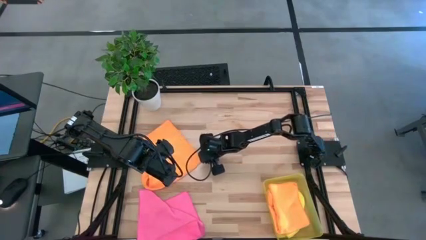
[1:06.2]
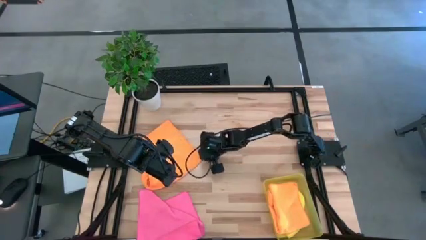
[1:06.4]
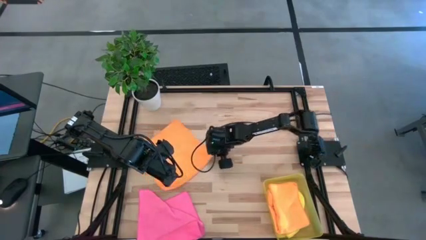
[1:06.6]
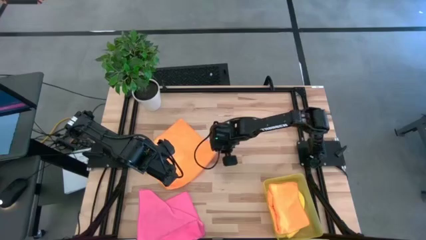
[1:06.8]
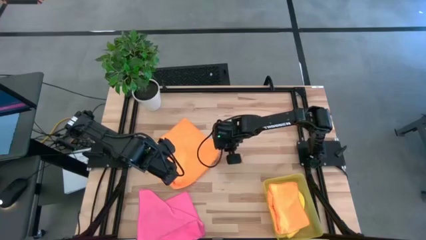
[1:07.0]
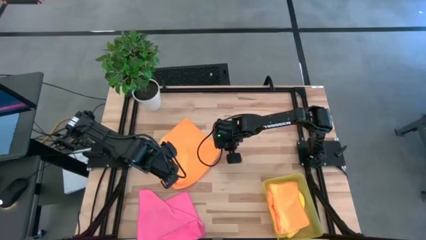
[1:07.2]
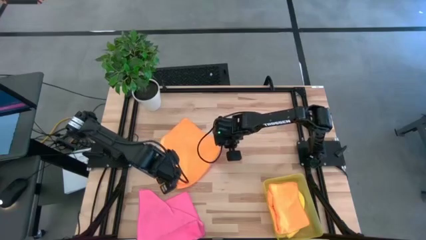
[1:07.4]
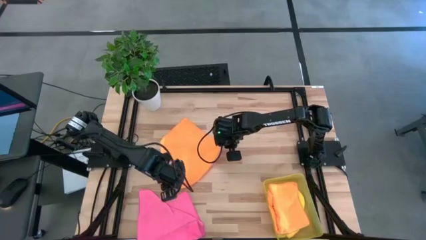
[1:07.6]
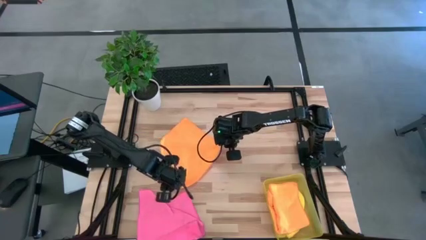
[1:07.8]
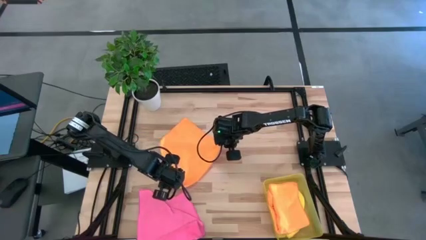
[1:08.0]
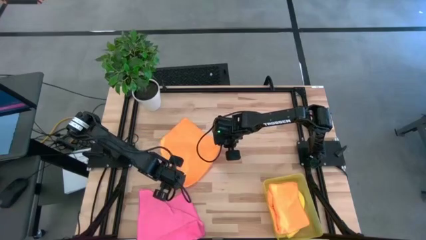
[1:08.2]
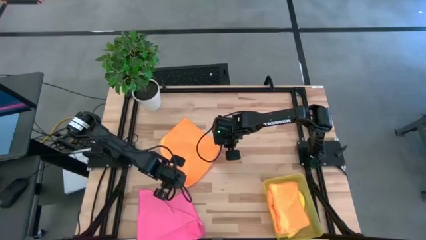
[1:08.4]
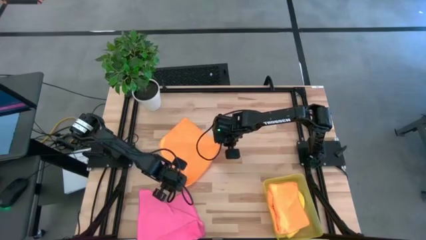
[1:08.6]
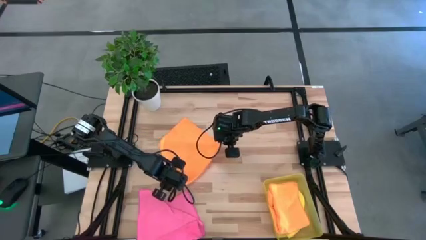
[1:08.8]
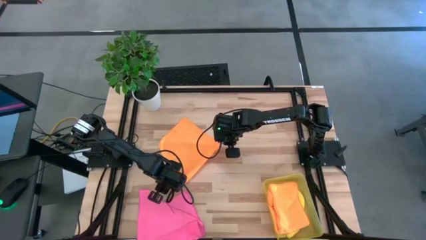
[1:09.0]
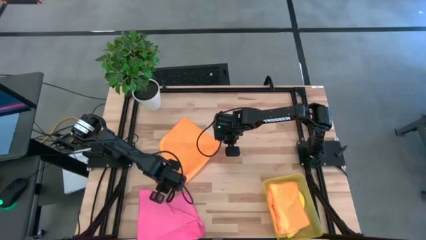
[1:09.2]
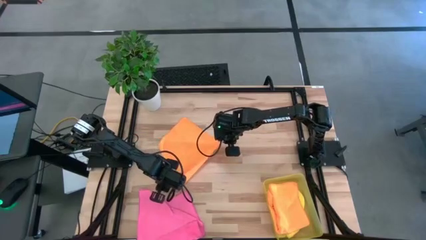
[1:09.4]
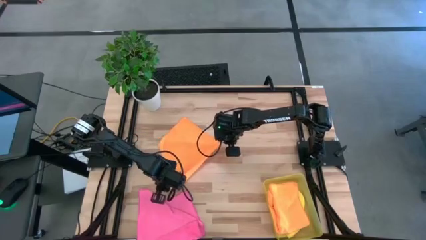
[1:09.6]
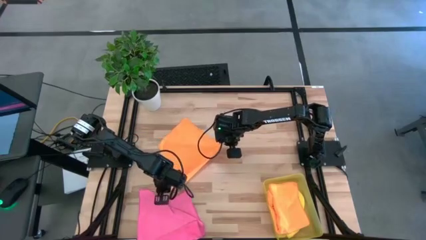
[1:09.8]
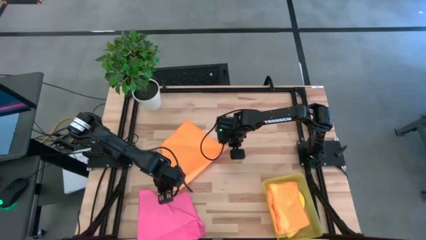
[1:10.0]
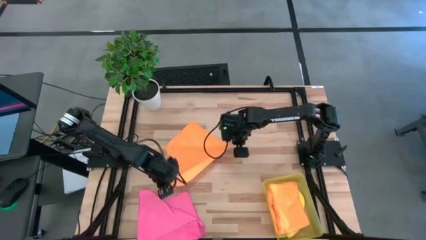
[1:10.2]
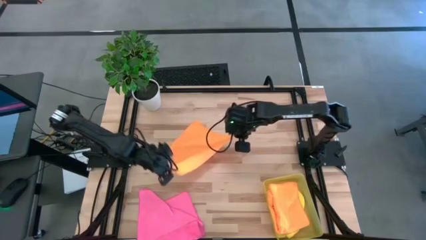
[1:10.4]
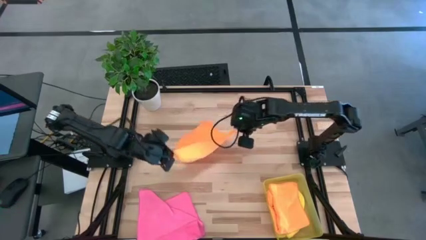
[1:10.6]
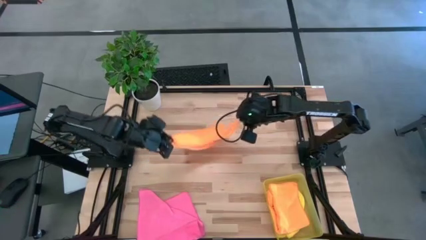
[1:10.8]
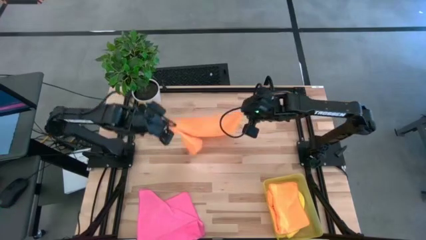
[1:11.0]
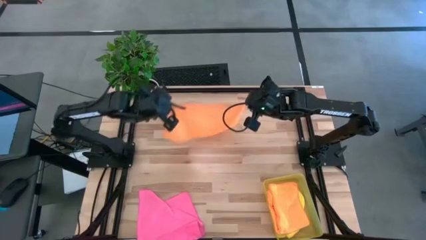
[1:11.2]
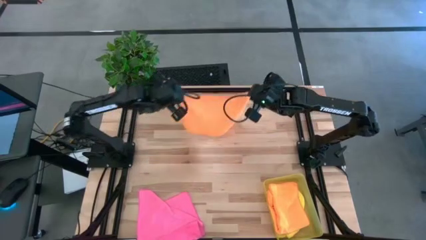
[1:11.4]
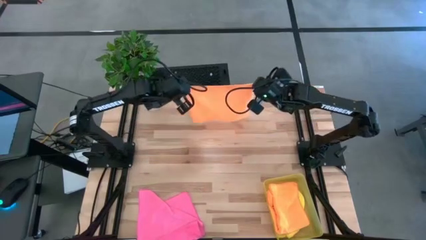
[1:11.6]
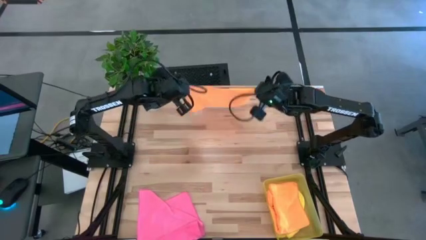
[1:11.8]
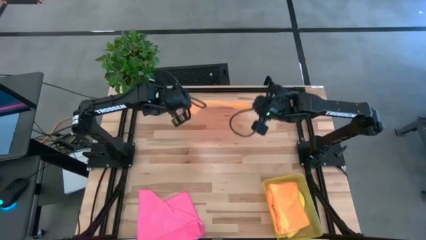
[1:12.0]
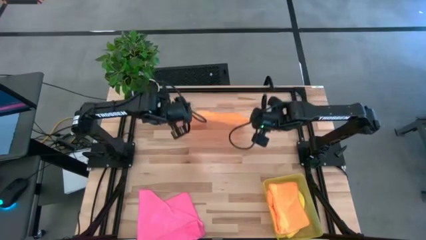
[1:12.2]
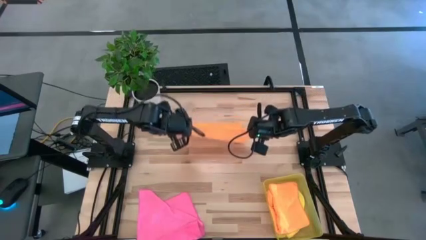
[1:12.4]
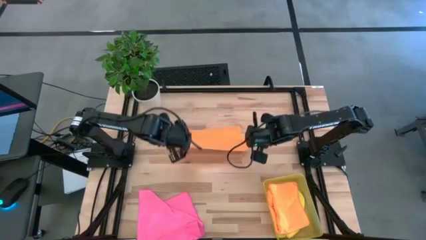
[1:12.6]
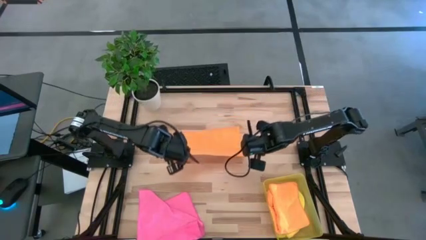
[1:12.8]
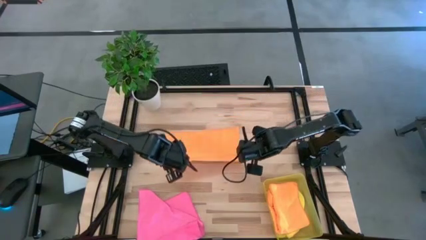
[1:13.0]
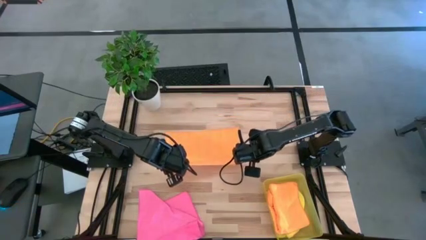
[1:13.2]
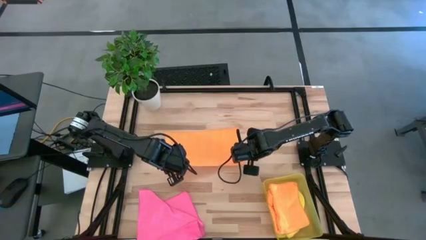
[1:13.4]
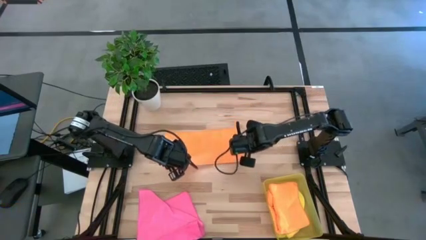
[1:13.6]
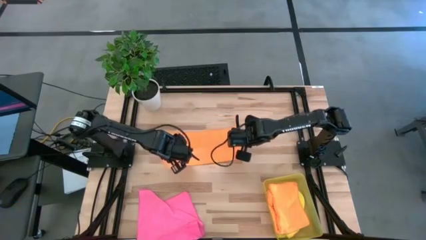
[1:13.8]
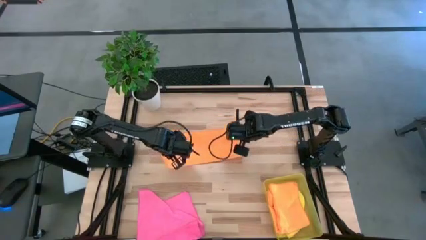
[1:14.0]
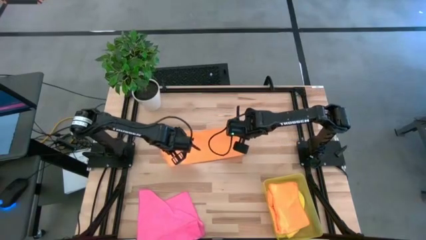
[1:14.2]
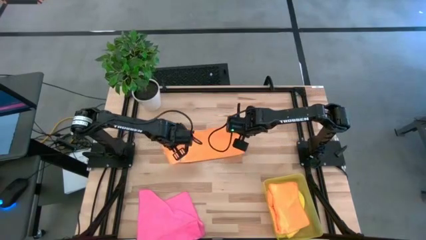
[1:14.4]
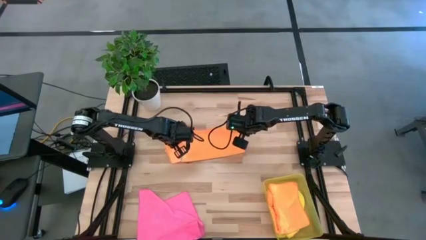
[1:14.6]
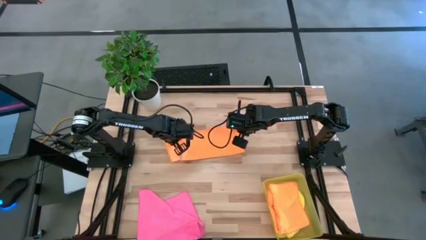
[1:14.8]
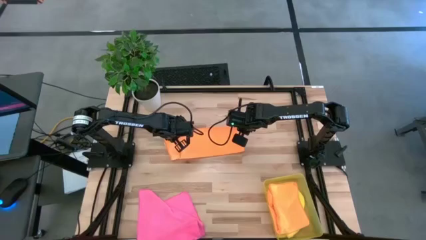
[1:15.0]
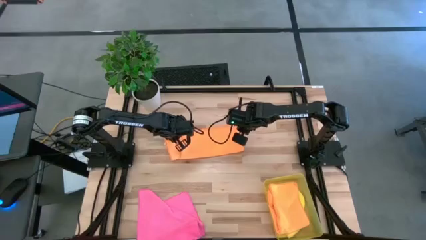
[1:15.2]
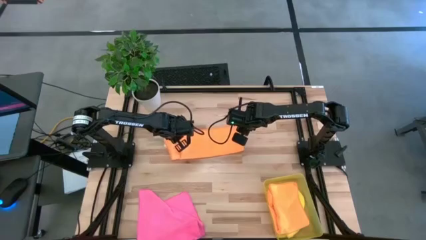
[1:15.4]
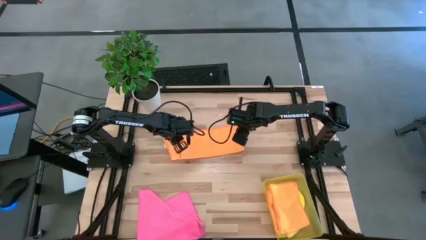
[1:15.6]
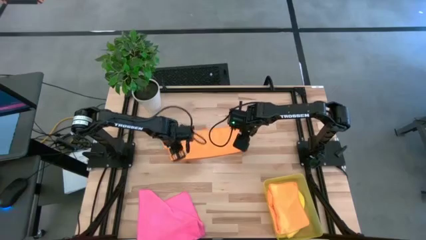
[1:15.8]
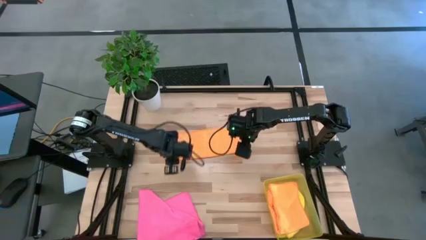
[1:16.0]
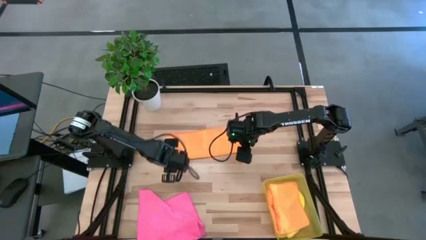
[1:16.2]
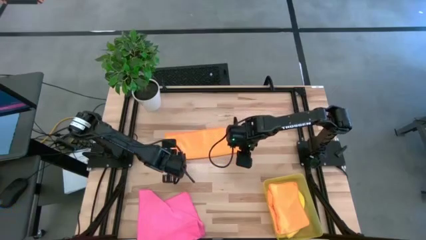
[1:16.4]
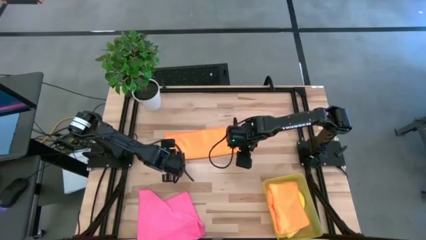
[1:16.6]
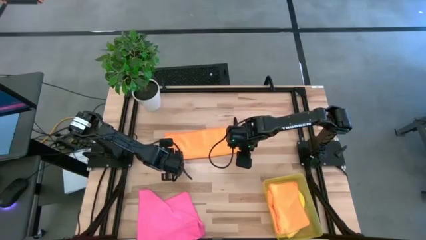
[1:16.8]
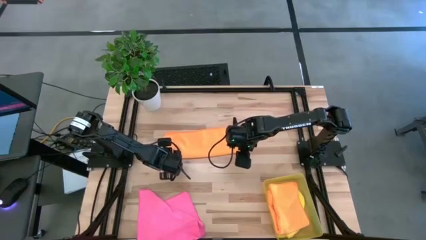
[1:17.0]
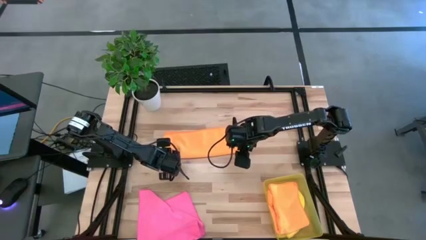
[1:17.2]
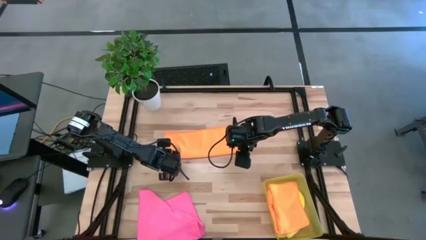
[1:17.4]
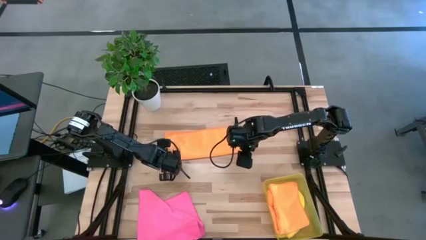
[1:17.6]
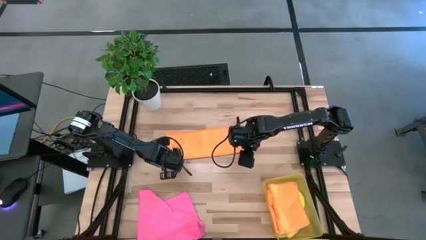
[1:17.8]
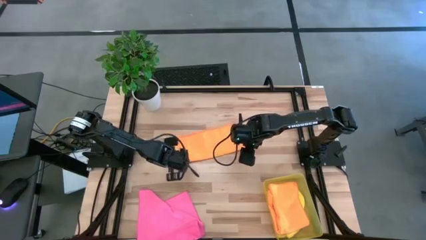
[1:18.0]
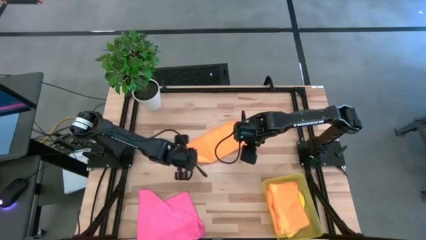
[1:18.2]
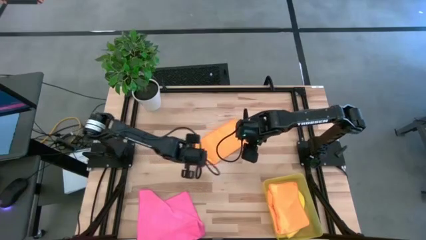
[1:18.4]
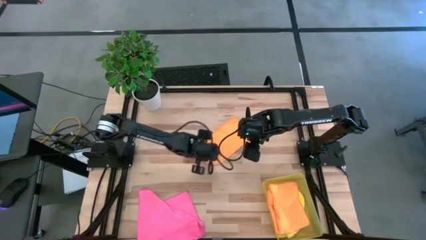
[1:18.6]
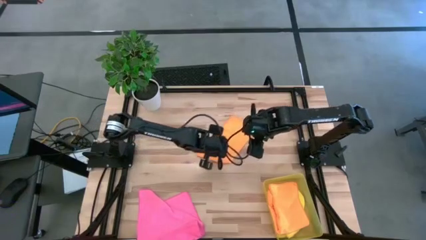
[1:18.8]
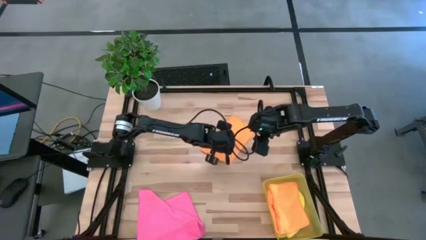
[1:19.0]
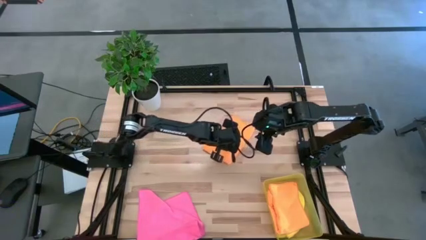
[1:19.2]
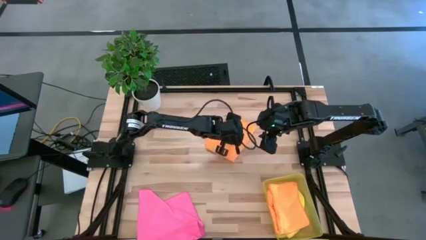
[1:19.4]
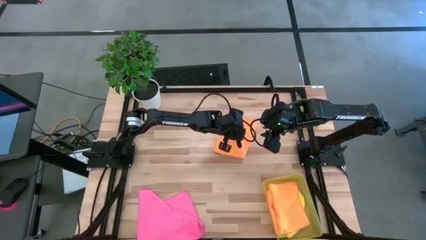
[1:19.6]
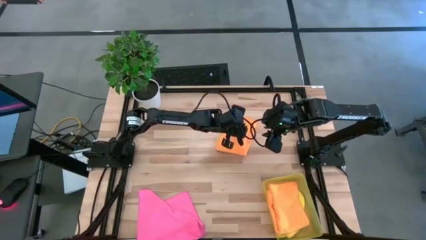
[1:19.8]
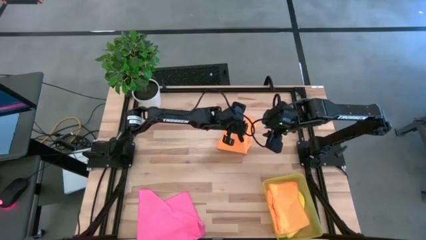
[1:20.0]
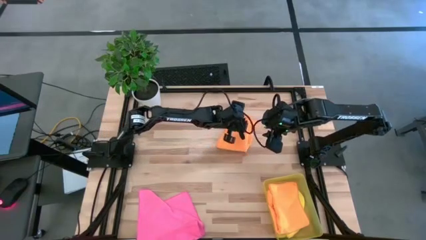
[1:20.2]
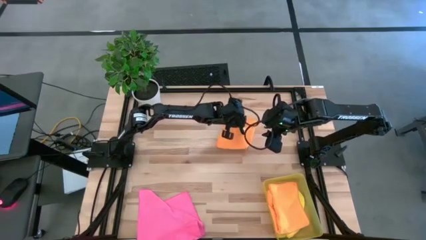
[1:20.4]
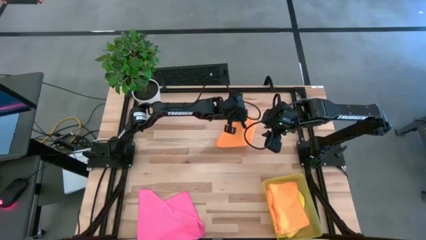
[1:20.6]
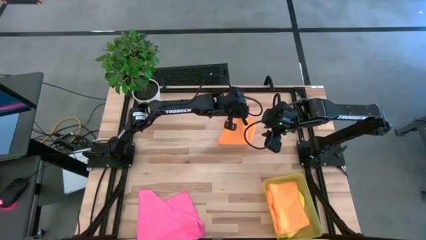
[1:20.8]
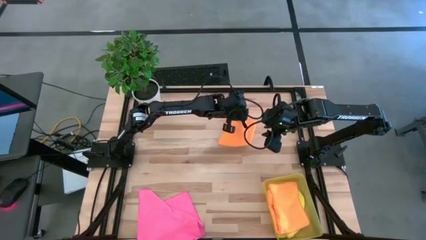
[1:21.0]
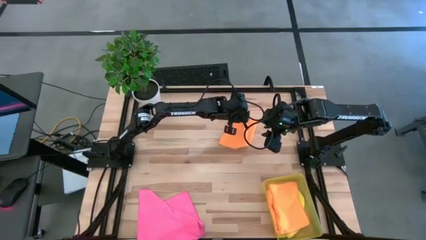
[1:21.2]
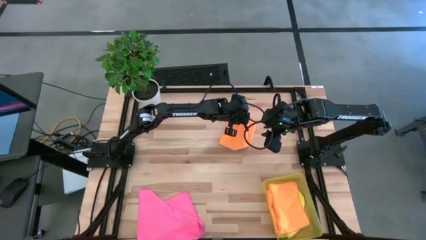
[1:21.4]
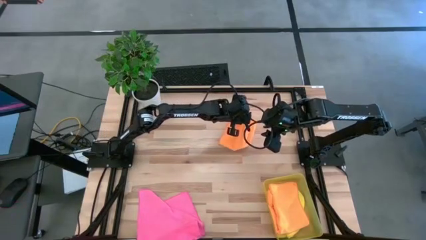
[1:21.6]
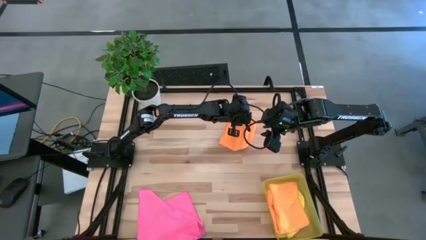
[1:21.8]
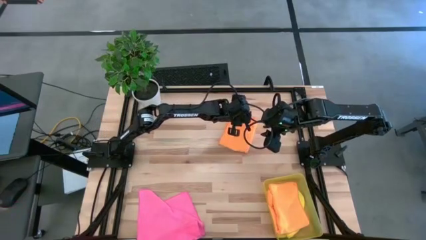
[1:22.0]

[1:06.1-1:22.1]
Task: Fold microfiber towels
Fold the orange cloth

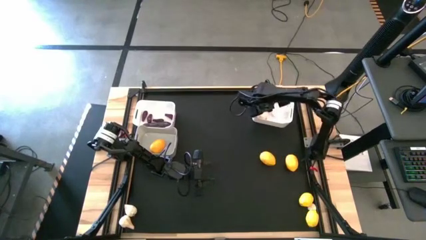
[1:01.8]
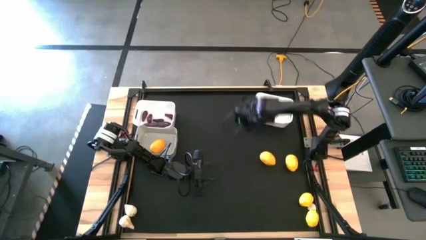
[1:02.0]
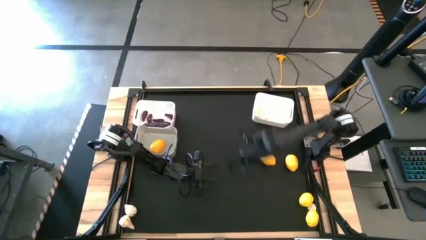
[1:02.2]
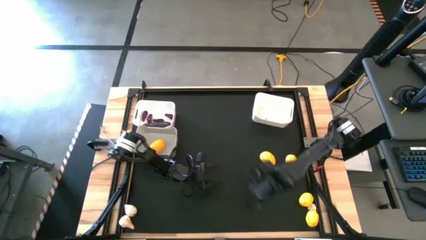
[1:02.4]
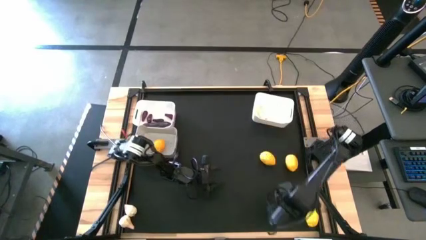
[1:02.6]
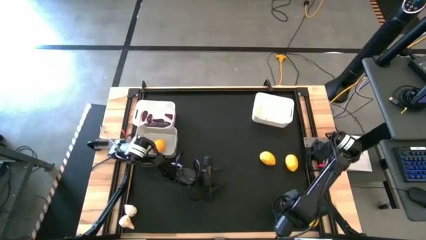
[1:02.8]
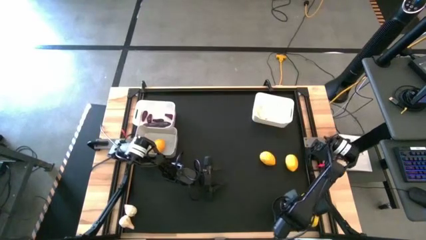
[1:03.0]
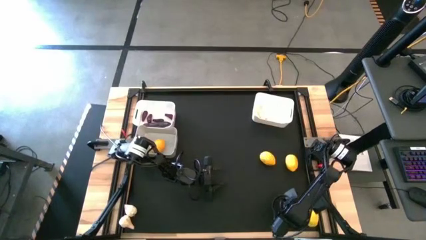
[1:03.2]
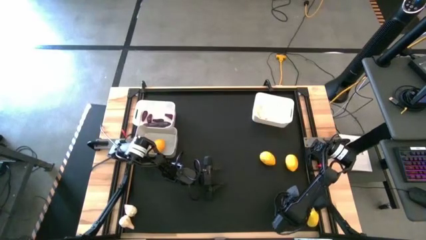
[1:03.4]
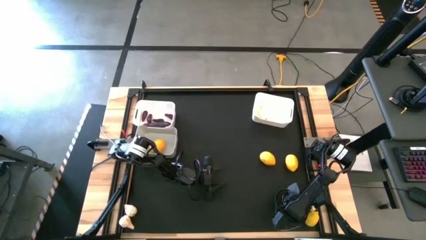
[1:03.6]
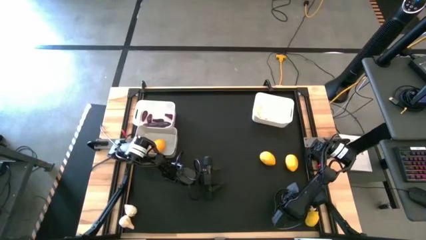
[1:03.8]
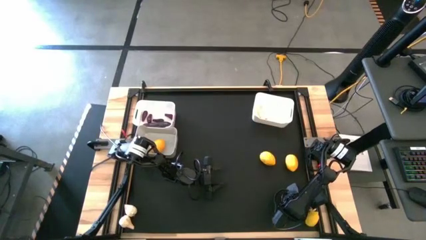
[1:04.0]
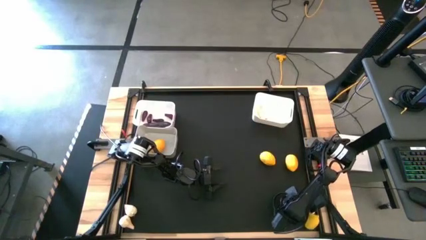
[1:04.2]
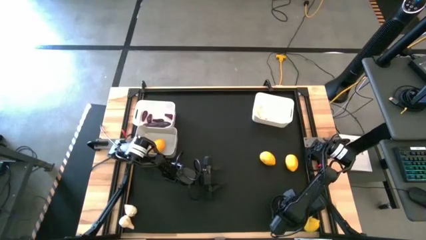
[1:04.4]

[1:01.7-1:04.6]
Task: Sort produce into baskets
Put the garlic into the right white bin
